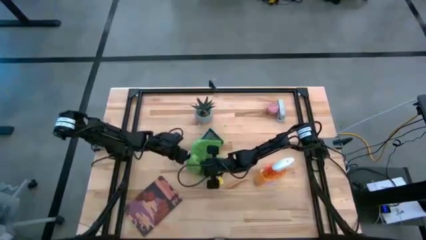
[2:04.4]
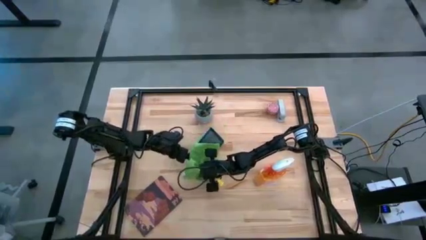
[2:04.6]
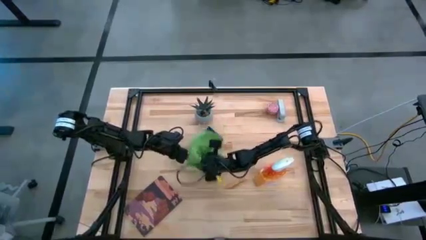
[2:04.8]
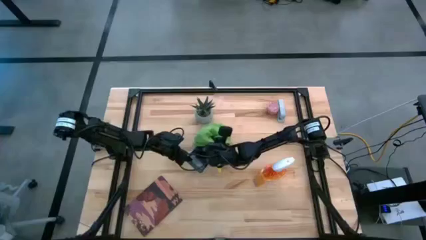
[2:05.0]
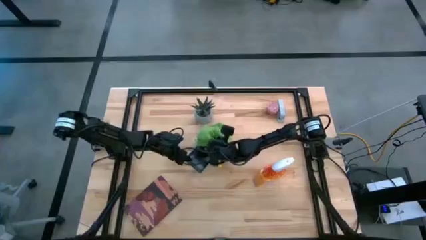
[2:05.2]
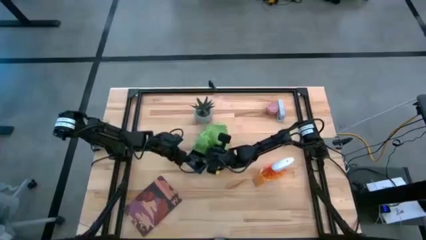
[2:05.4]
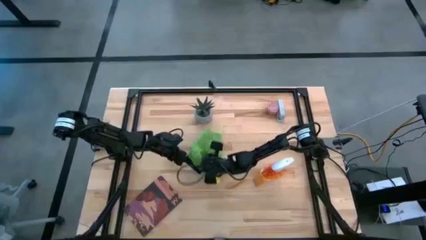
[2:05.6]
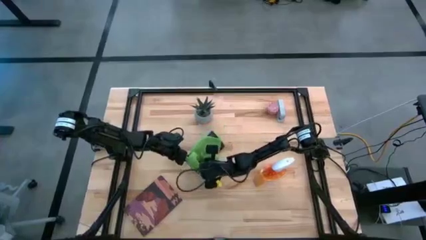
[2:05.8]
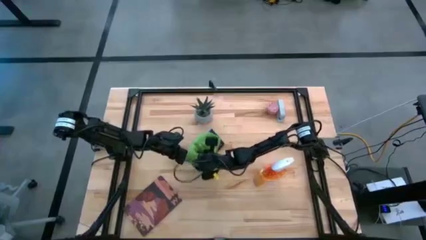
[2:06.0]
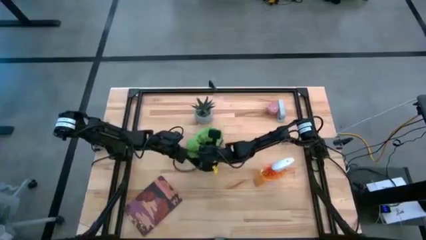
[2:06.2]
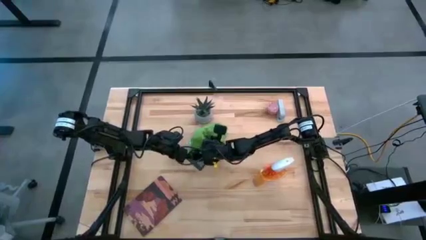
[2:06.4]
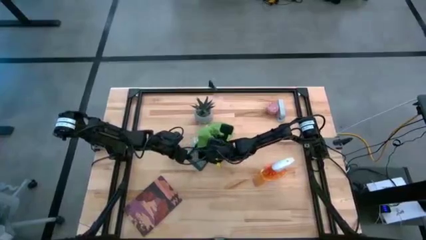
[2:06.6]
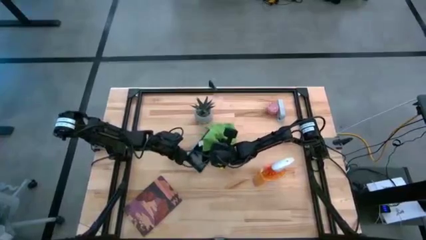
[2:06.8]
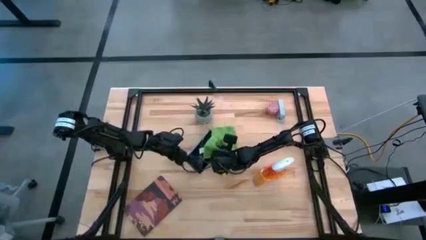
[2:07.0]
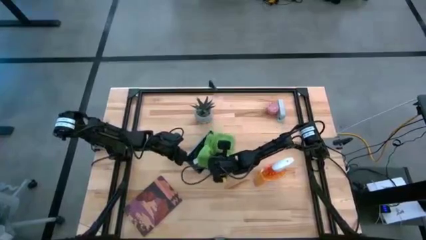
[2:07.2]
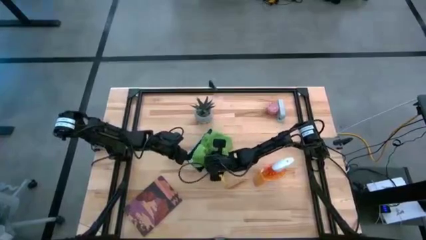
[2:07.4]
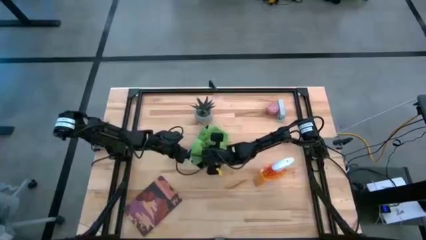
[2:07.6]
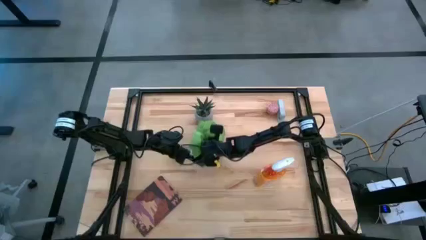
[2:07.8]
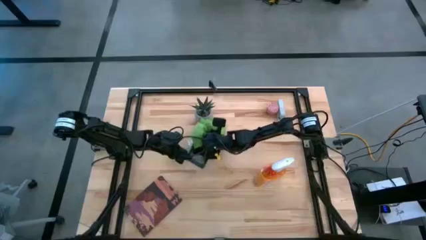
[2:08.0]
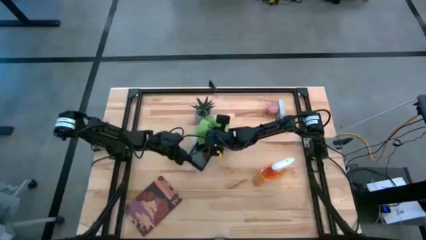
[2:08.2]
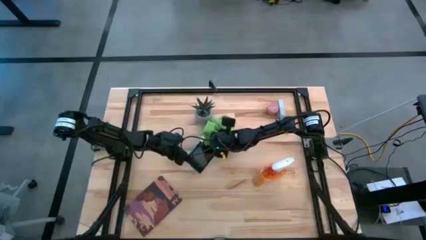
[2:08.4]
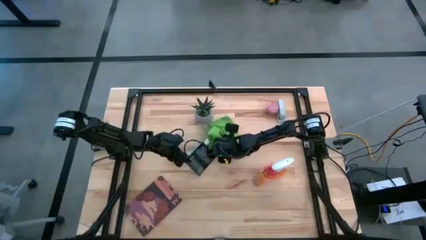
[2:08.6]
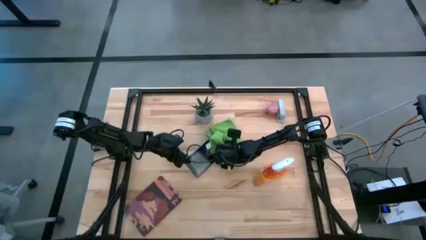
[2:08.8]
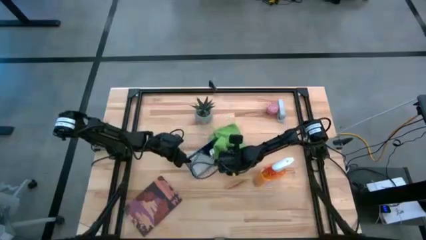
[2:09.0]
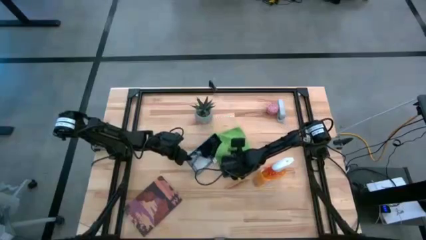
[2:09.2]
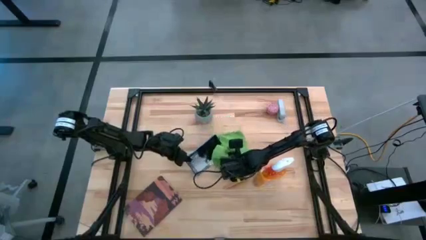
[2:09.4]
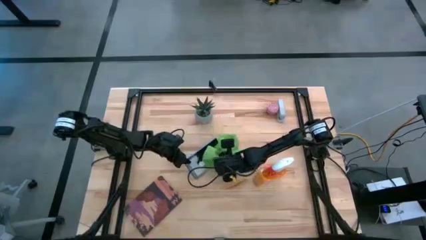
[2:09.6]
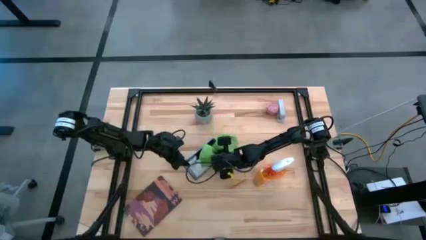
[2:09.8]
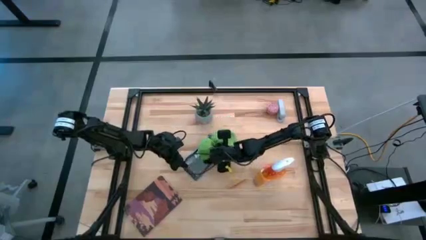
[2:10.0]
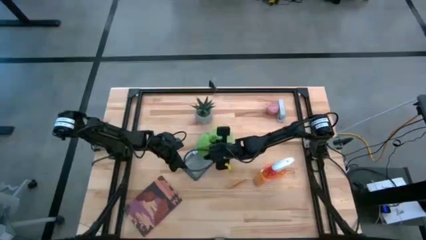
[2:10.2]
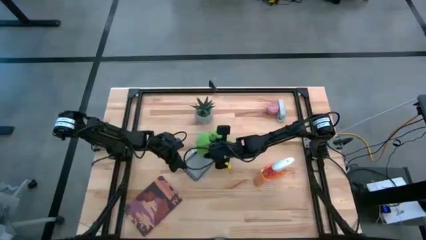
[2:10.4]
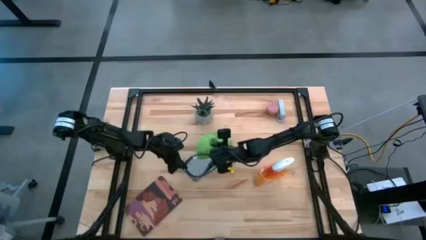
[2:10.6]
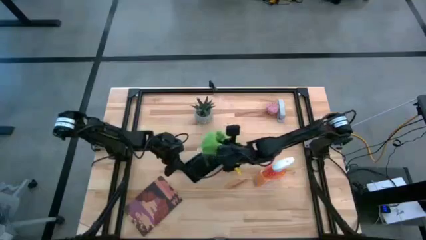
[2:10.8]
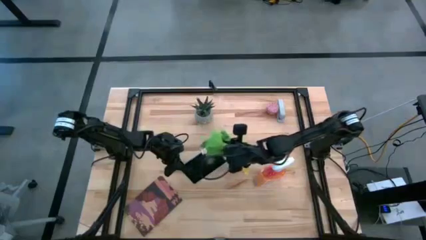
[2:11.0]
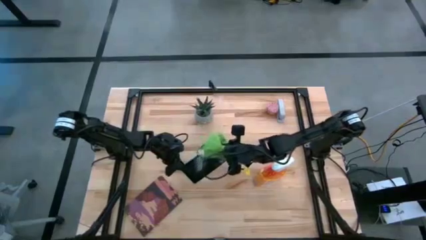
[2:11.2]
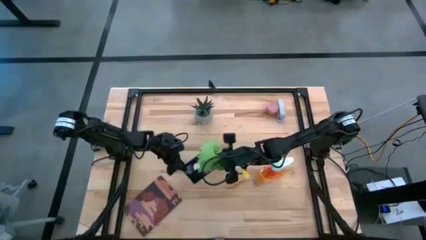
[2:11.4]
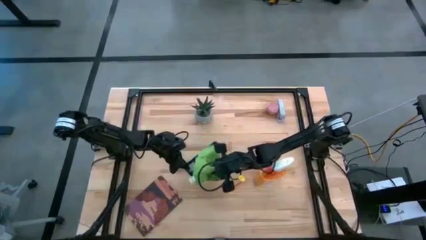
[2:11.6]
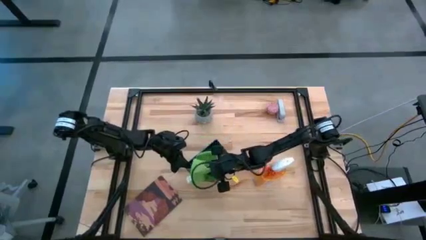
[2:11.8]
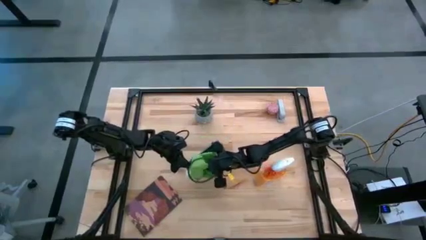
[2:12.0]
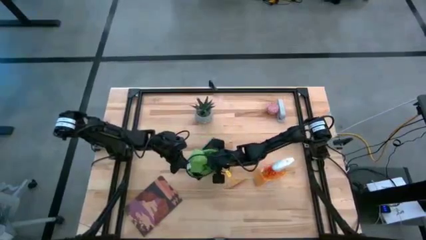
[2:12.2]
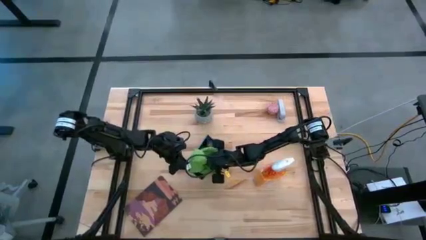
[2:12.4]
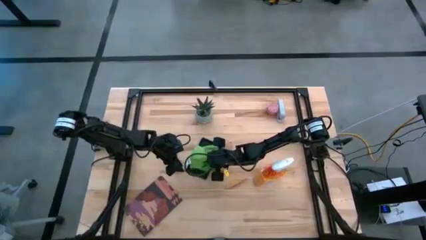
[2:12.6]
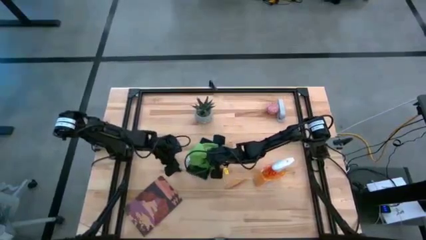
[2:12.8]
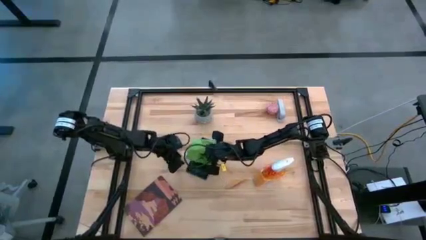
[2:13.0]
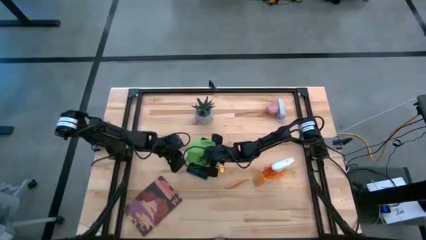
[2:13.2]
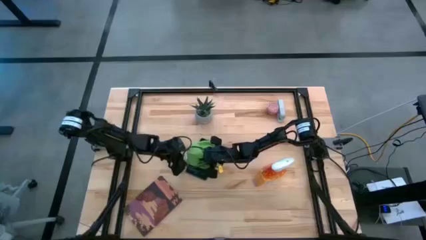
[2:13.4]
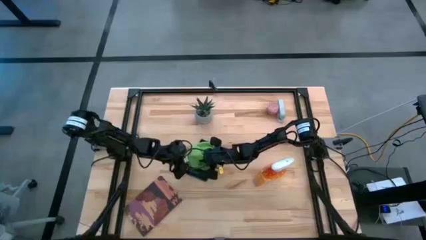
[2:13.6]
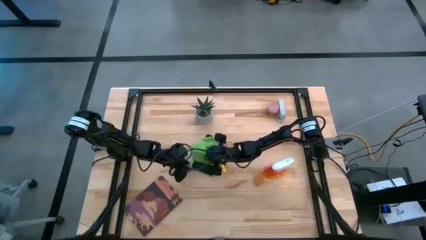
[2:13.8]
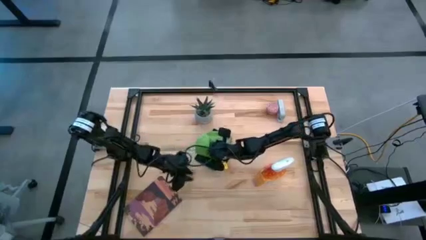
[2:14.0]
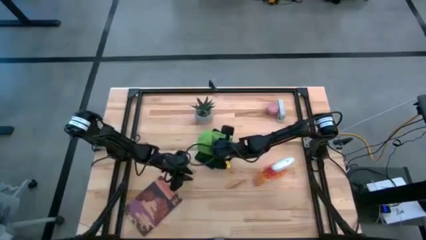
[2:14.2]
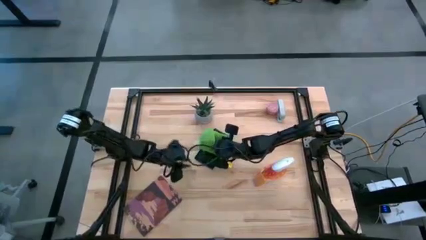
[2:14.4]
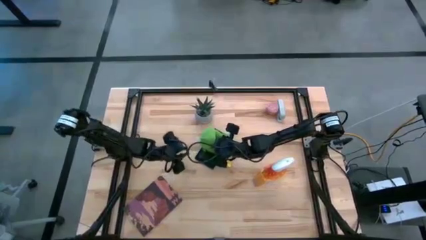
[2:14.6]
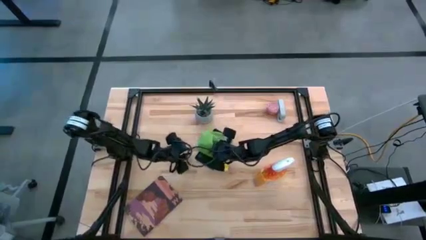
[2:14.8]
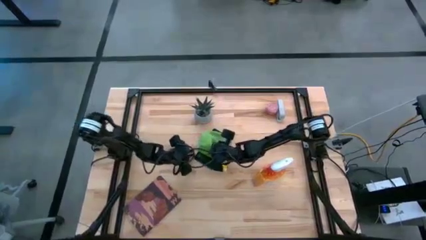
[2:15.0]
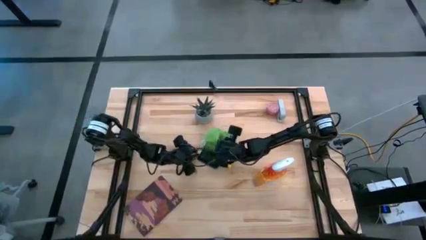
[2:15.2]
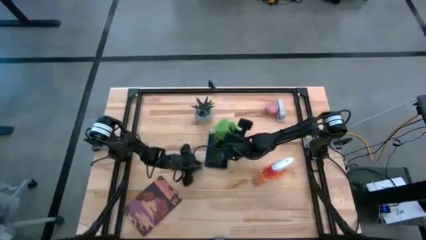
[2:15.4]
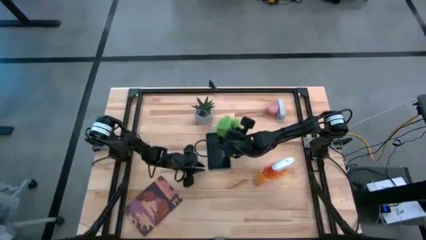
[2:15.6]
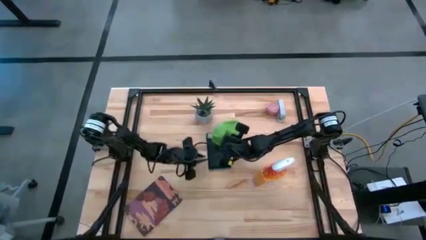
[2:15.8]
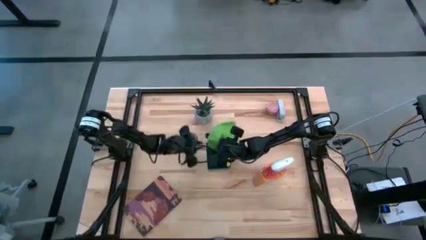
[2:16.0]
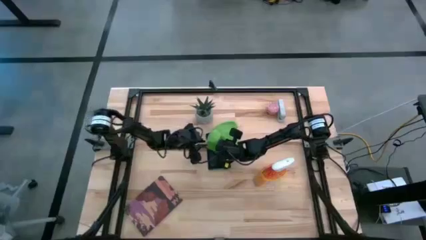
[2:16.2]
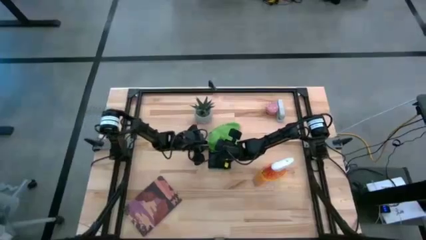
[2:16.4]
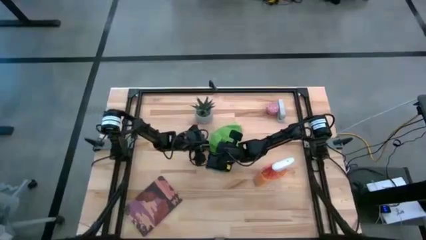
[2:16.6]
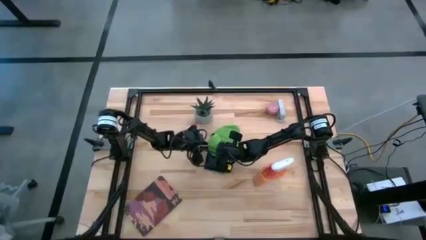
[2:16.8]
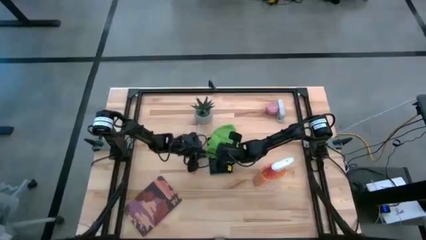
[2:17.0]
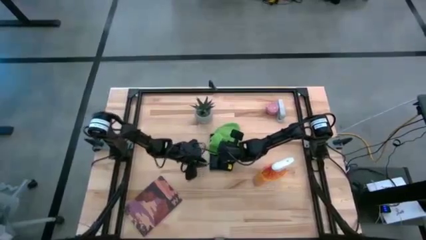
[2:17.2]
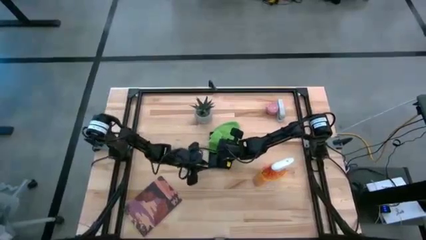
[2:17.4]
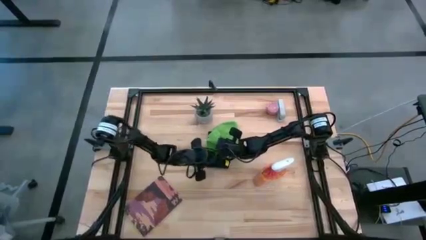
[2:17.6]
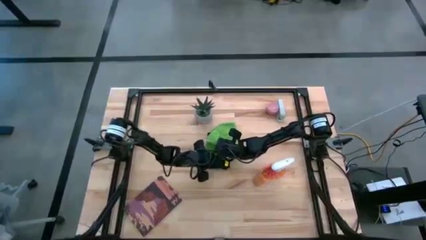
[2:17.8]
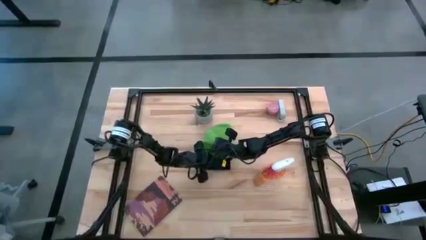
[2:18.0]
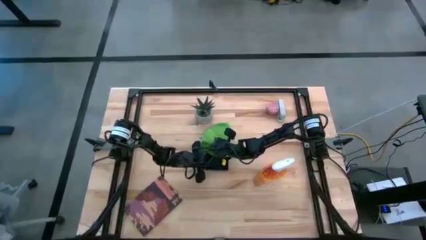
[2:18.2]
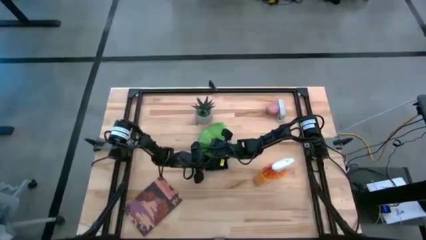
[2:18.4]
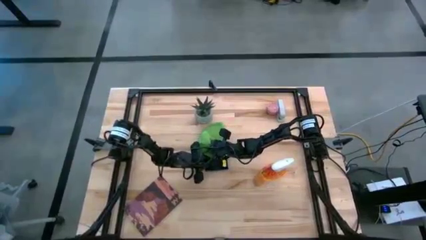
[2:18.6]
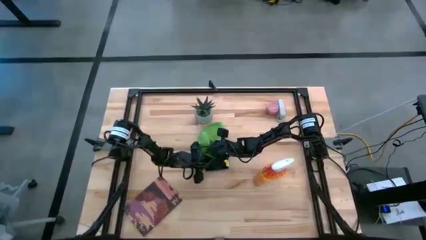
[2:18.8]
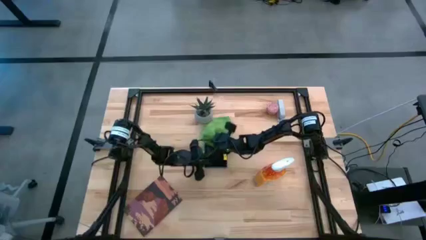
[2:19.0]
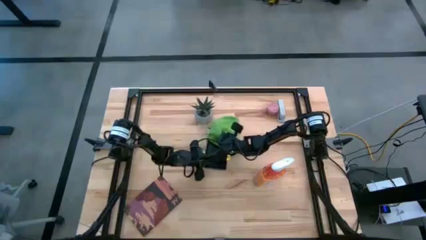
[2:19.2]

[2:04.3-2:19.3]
Task: Apply microfiber cloth
Wipe the front of the tablet with the microfiber cloth

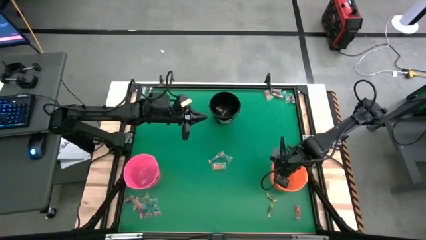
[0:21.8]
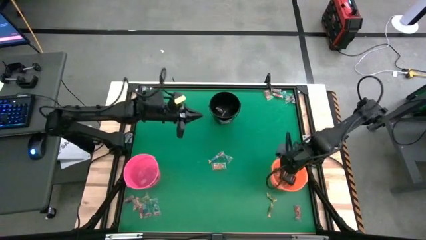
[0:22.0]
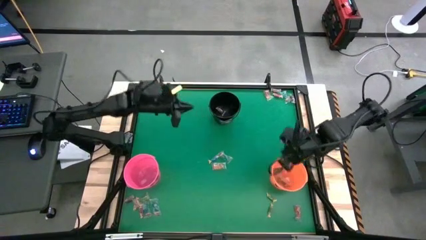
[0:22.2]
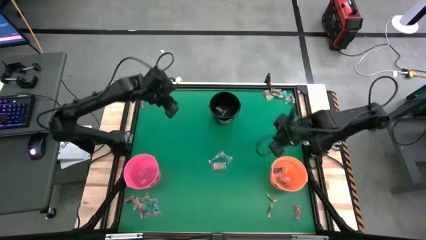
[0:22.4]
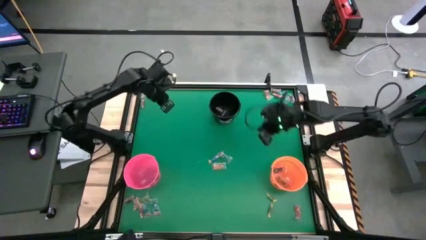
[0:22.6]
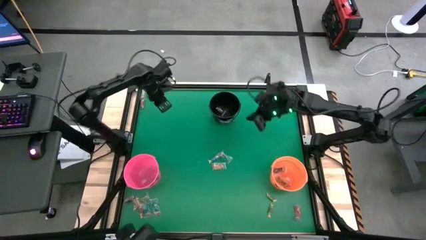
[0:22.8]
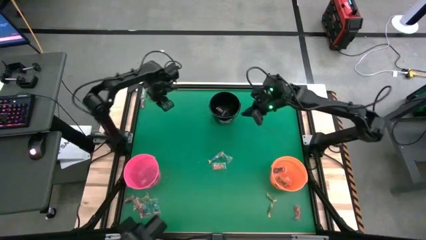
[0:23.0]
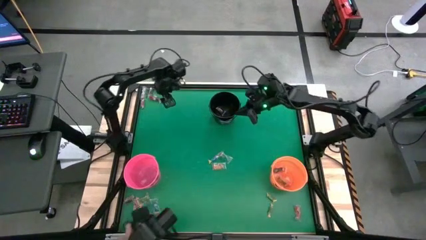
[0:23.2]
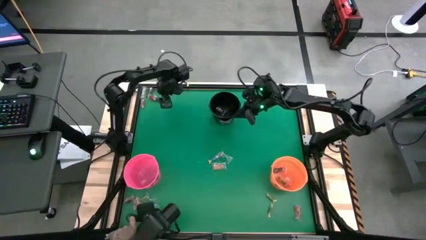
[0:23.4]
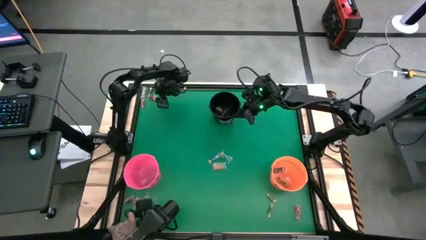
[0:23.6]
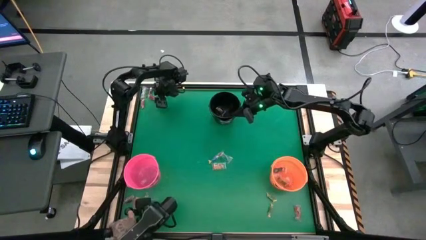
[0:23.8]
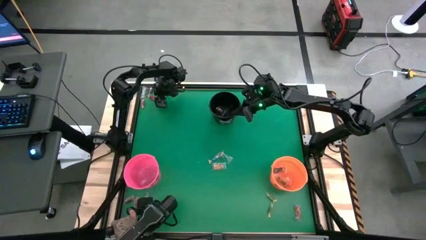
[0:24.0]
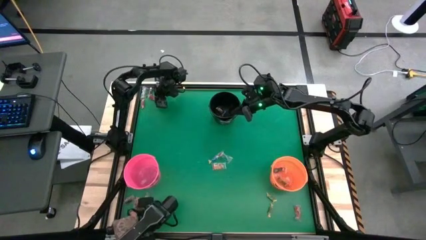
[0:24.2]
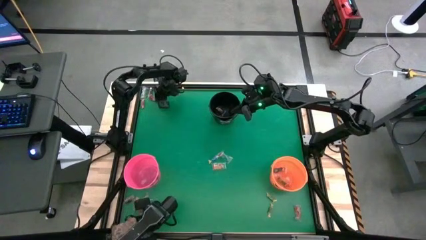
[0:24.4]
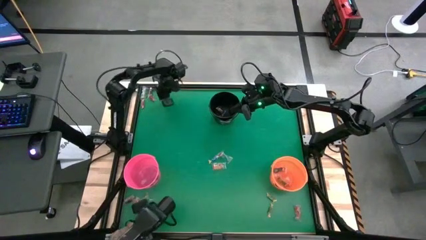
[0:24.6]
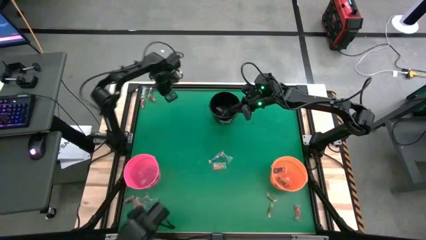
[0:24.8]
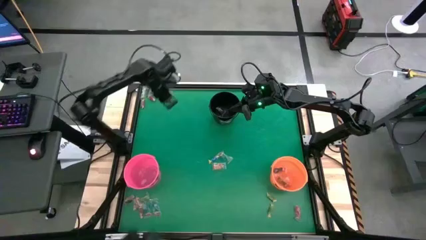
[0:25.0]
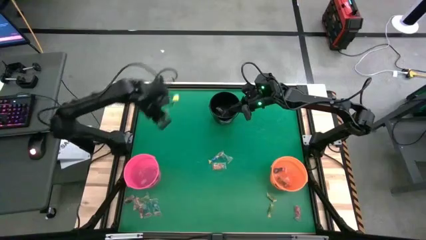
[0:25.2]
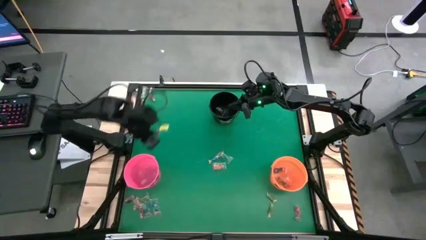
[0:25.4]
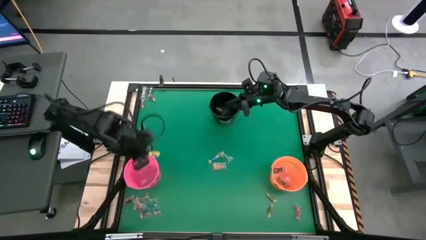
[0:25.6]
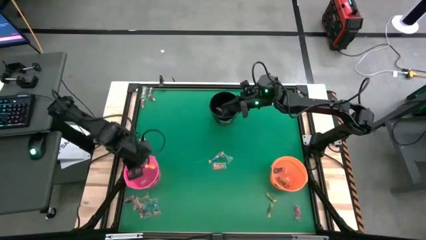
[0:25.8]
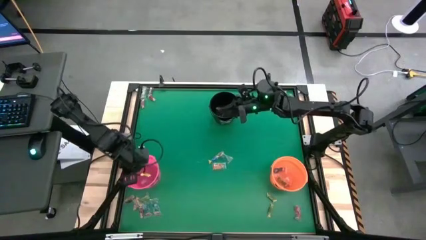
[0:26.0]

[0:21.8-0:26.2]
Task: Sort candy by brand, put in halloween buckets
Put the purple candy into the pink bin
